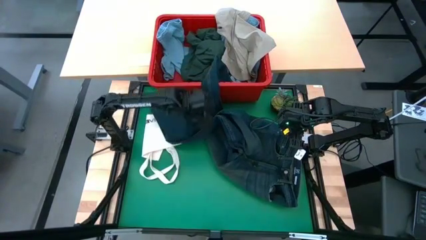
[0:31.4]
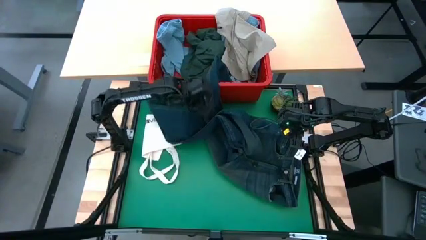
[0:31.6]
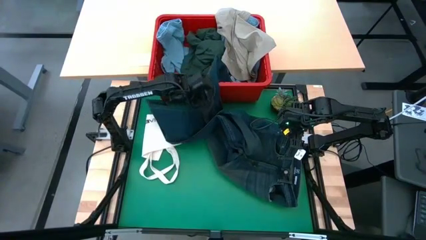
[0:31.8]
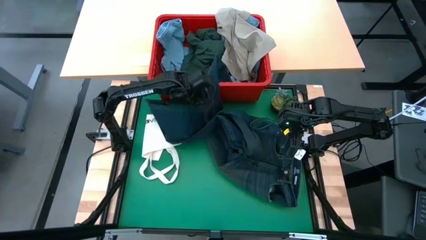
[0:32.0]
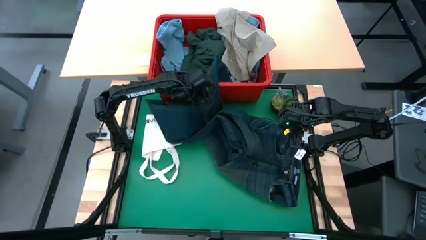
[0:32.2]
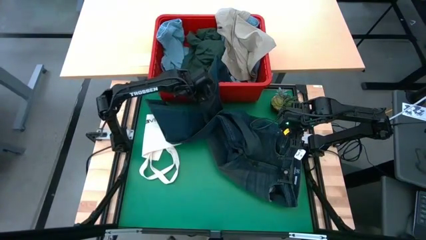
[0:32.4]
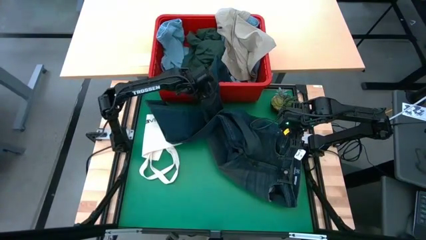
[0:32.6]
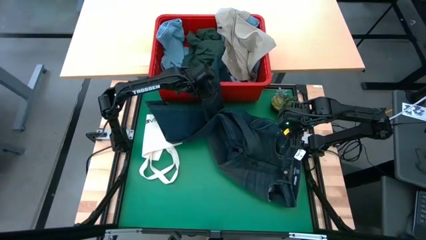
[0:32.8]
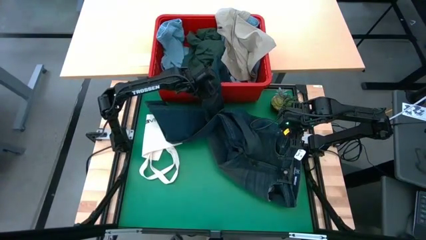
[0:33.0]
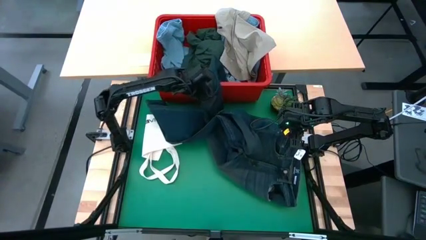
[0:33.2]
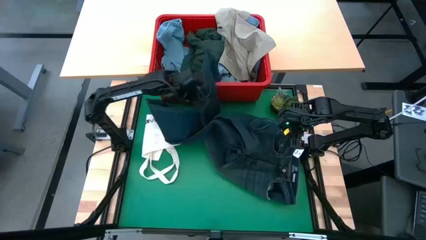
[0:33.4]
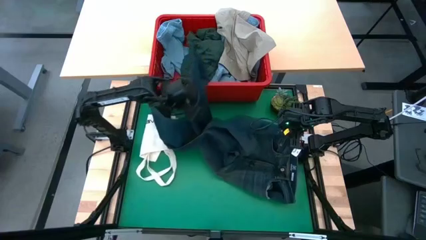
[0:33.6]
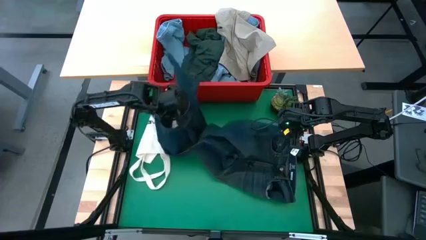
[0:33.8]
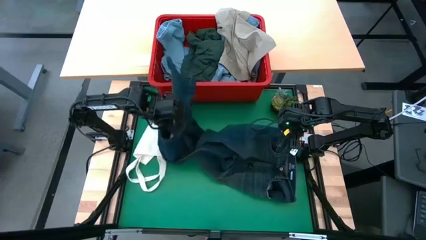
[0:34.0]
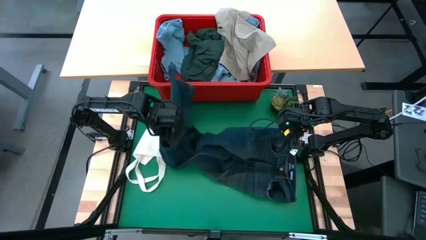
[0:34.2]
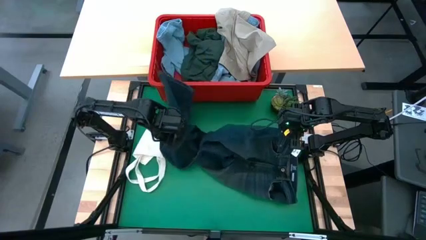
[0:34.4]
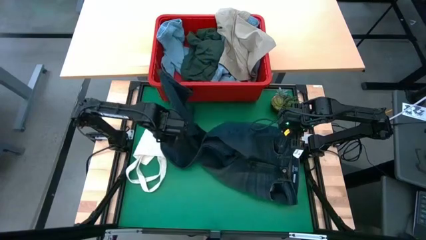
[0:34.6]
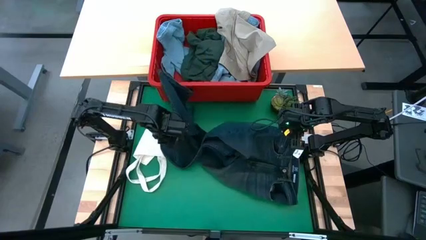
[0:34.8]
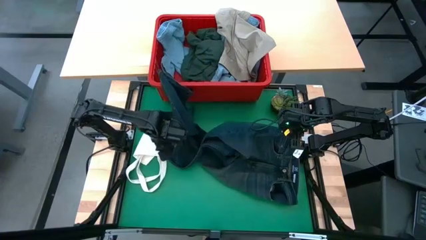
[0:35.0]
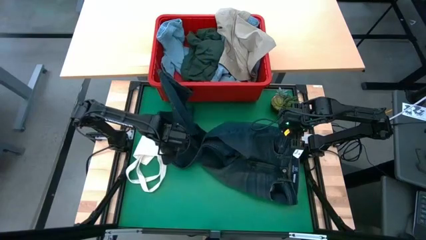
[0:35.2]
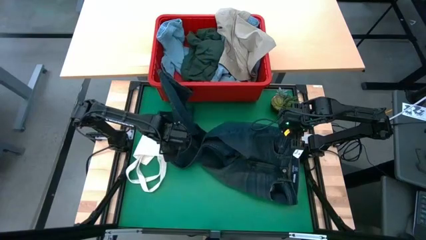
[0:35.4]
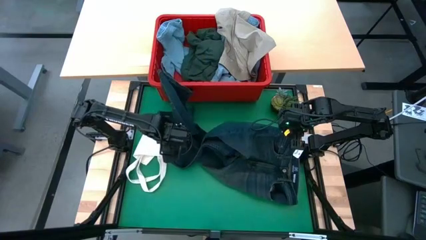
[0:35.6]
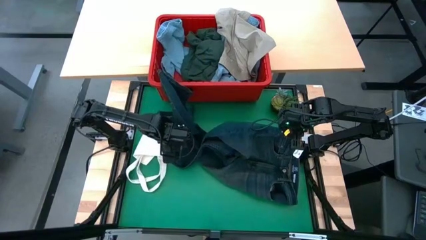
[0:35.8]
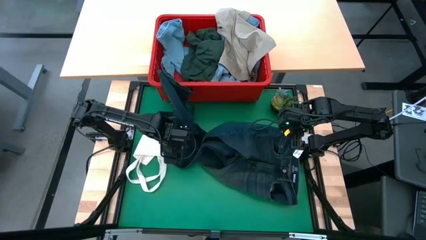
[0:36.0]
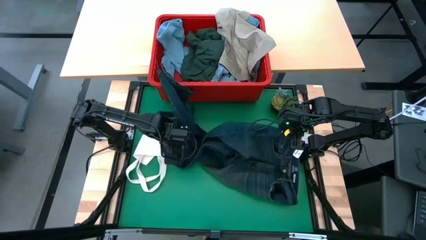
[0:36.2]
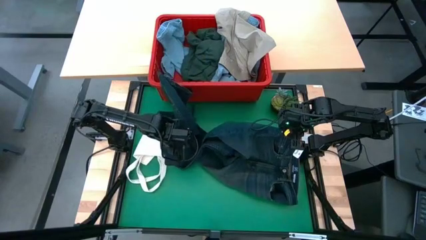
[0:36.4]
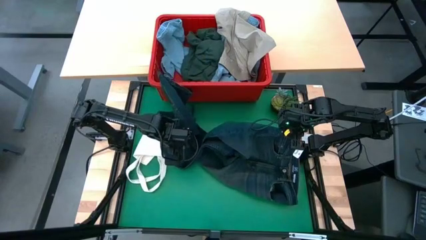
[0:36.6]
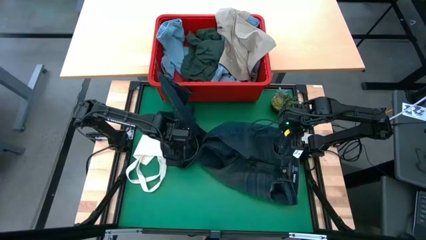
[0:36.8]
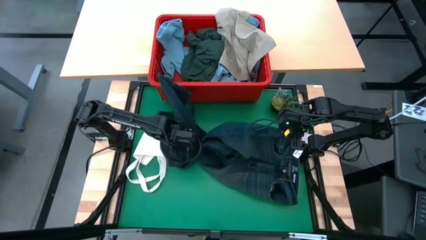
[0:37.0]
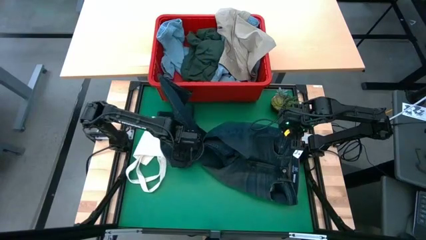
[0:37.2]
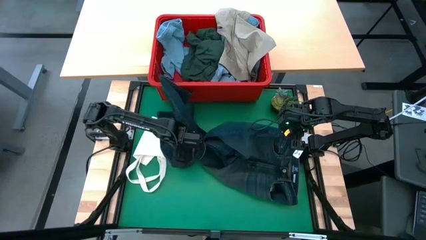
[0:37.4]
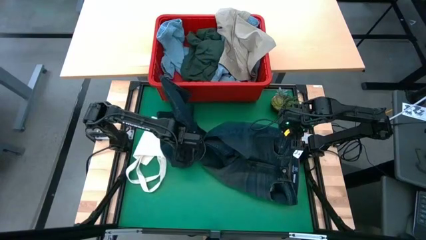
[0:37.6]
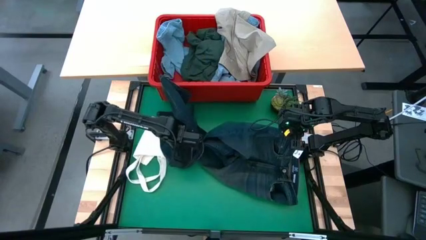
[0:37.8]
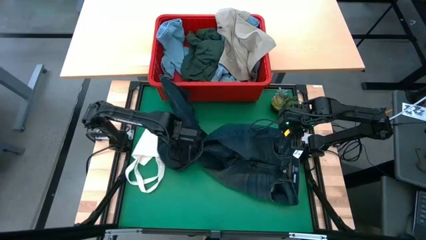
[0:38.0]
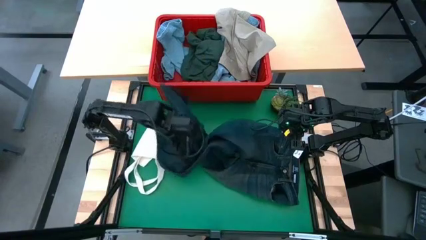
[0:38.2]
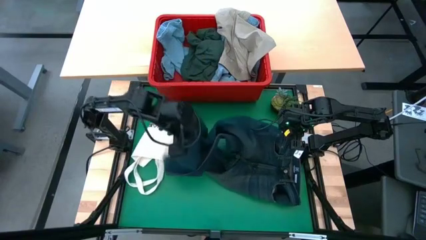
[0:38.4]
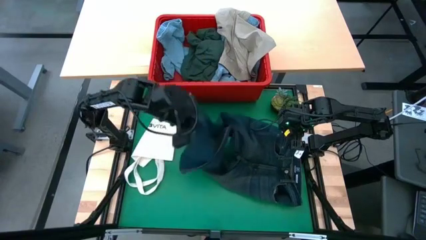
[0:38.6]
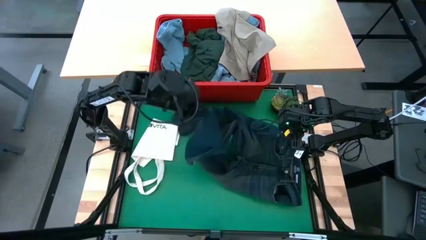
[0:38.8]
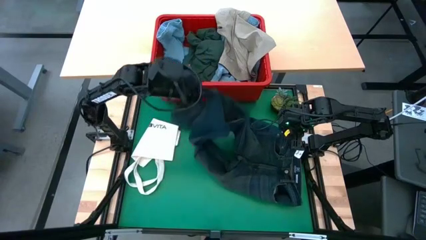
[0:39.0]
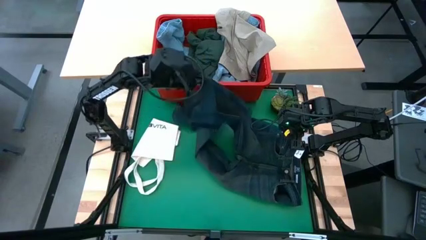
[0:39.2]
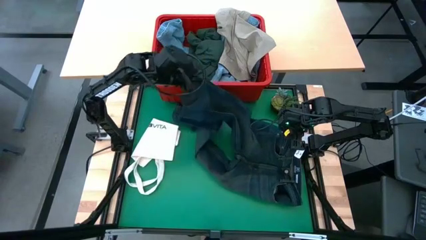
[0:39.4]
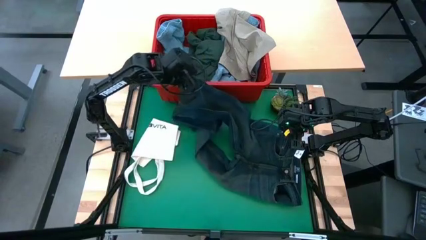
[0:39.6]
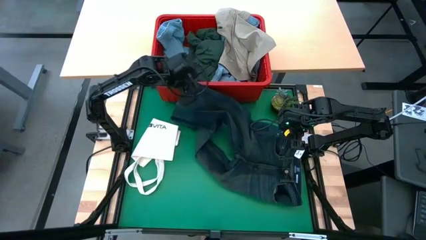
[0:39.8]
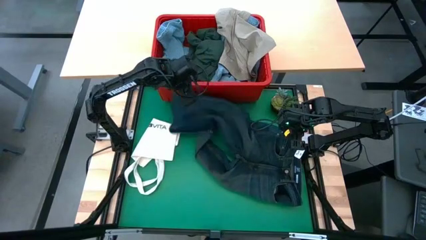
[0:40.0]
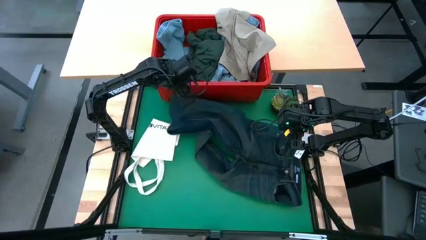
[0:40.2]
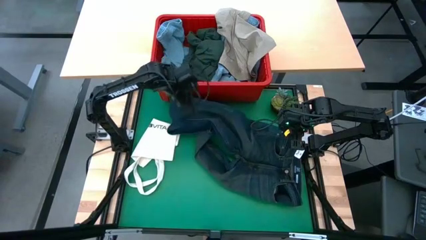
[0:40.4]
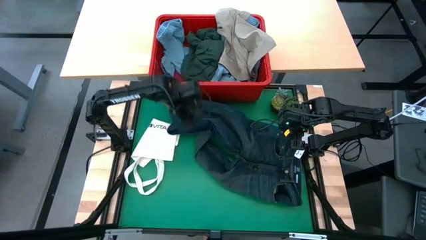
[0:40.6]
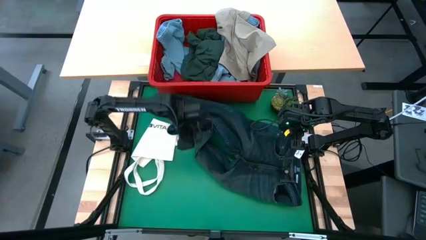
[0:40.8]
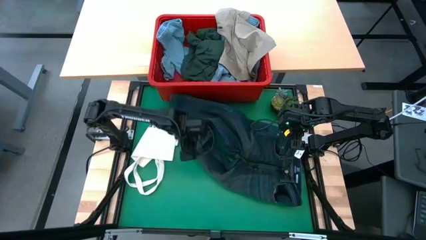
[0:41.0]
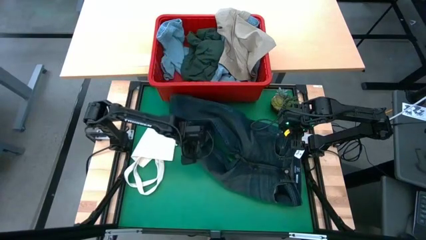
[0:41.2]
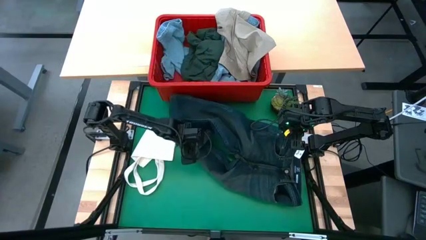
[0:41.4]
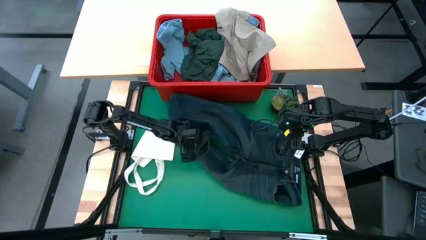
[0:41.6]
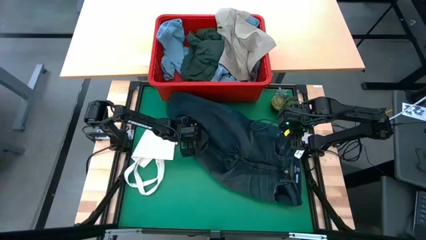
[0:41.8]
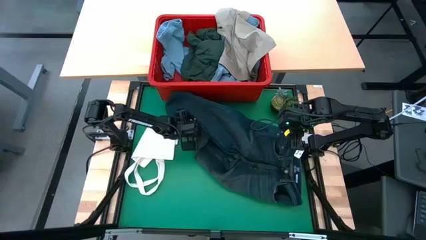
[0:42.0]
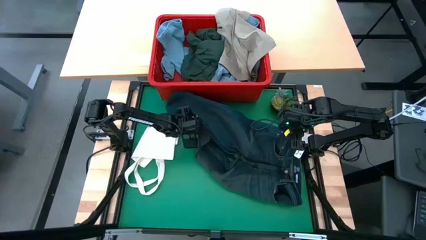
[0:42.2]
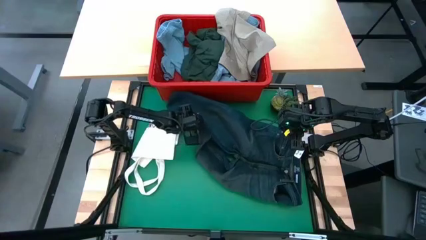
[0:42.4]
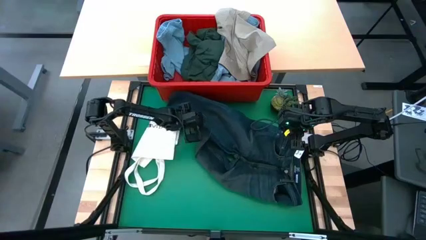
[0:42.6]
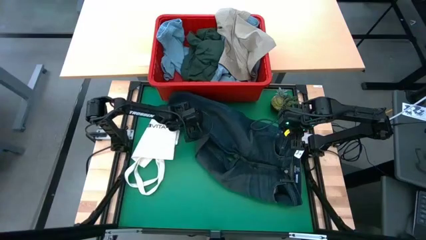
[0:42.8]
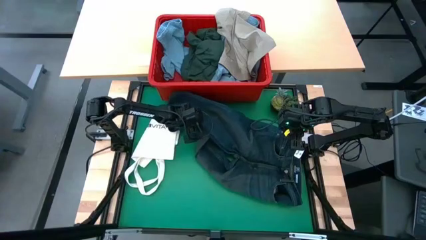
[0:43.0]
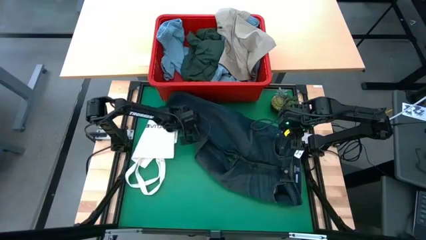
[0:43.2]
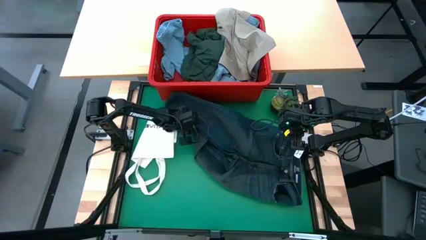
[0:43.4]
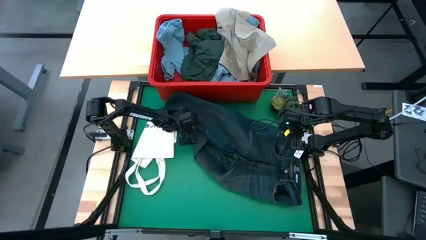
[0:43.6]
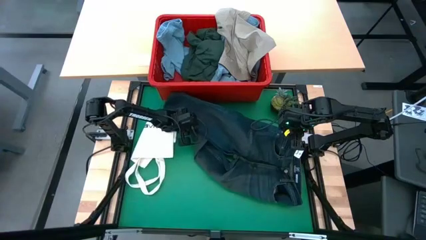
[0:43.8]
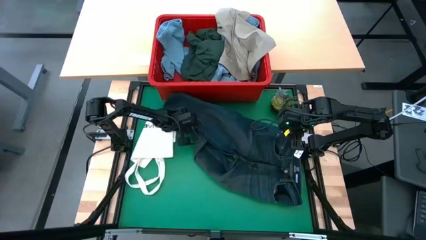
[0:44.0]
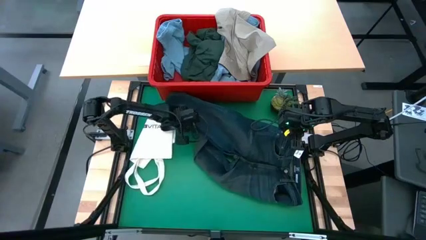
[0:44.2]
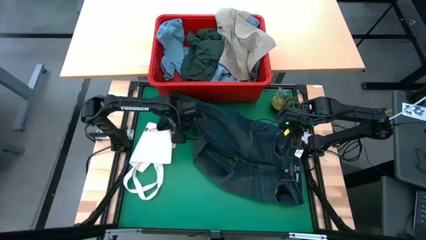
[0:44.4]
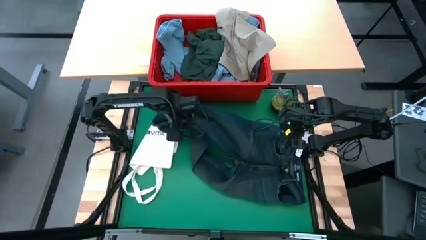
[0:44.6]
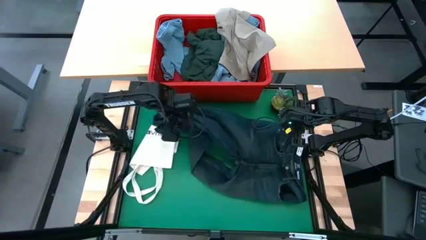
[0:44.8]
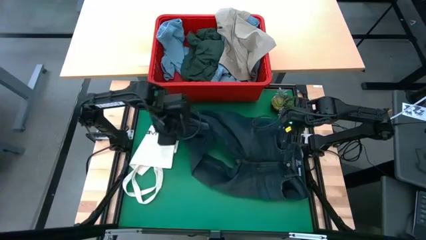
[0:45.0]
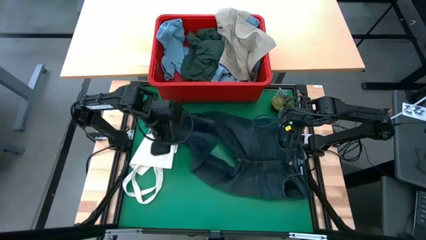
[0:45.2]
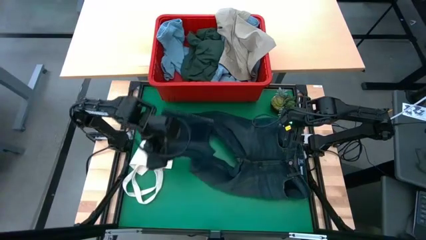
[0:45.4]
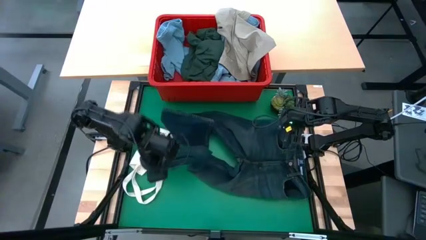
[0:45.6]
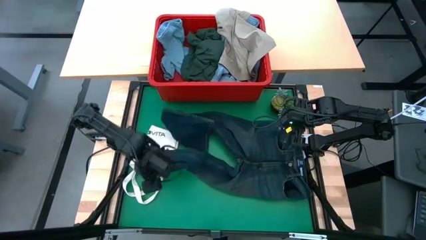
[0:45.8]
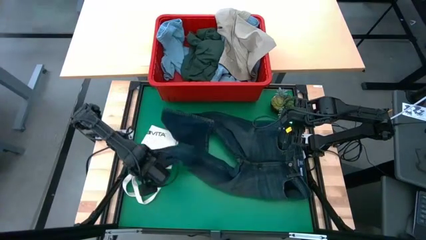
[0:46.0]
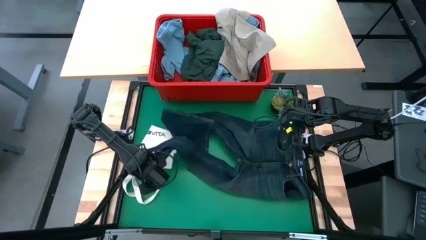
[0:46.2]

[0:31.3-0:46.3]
Task: Fold laundry
Remove the dark blue pants from the laundry bin

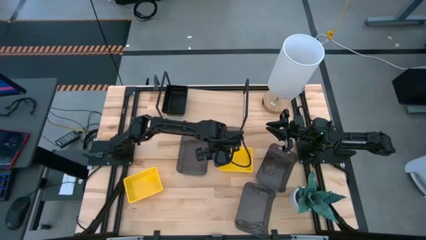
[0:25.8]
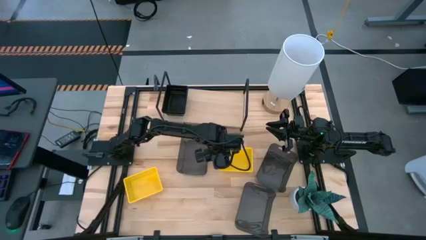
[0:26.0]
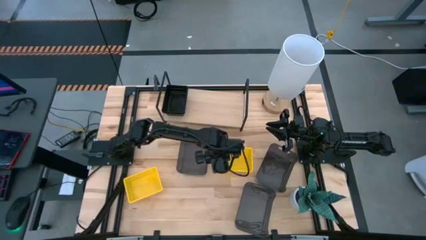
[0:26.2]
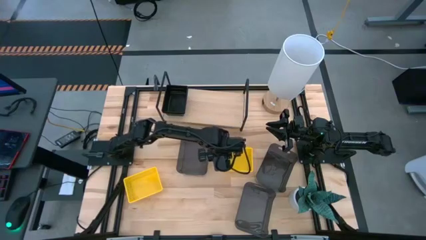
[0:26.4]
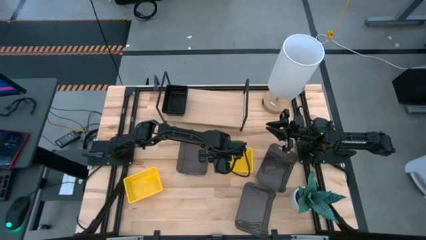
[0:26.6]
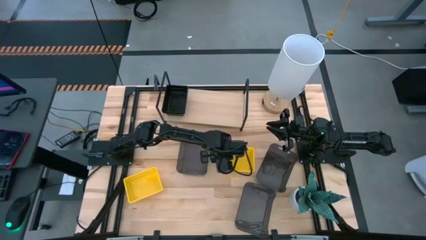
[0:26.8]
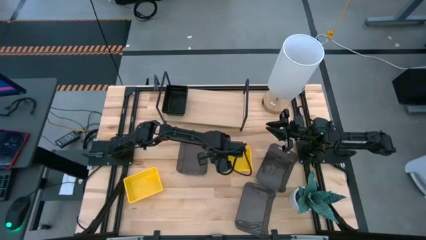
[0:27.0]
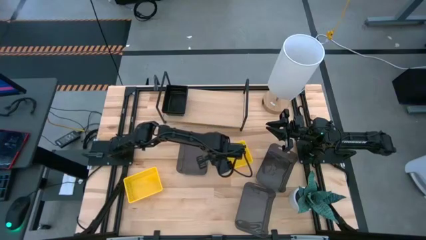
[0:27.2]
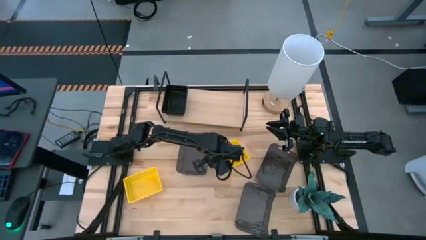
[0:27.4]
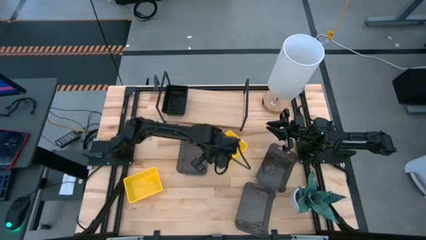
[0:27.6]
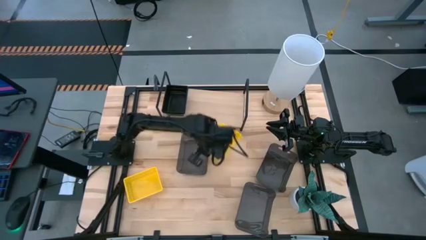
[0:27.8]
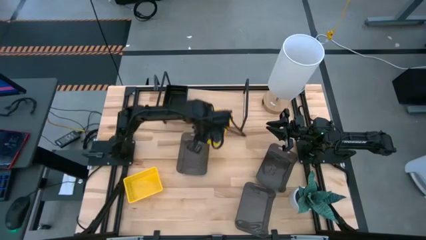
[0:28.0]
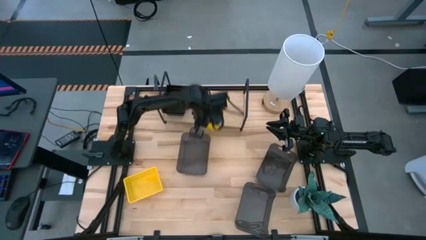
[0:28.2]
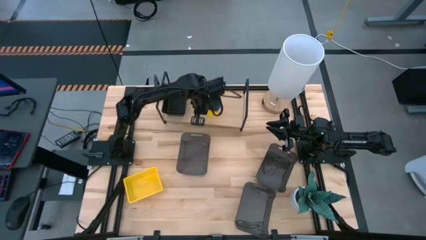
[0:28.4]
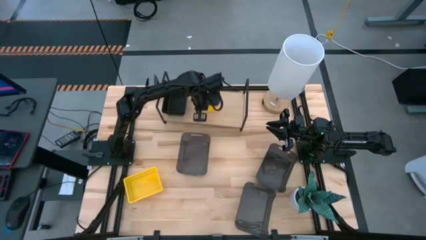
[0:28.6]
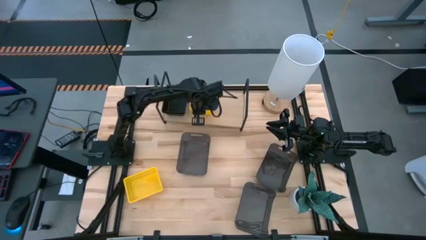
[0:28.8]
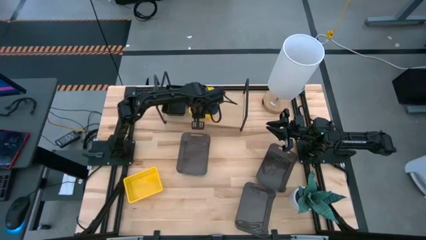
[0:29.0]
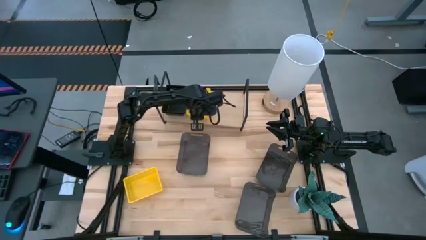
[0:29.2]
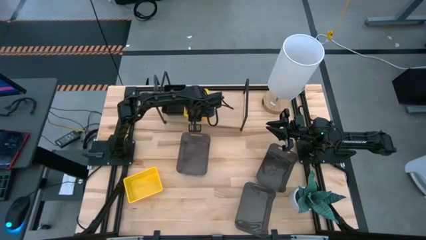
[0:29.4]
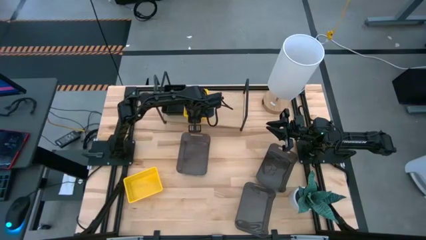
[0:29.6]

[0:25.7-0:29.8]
Task: Stack baskets on shelf by color
Put the stacked yellow basket on the shelf
